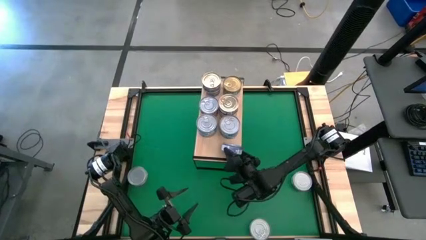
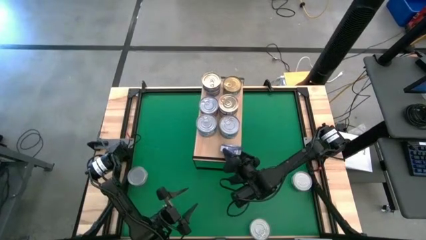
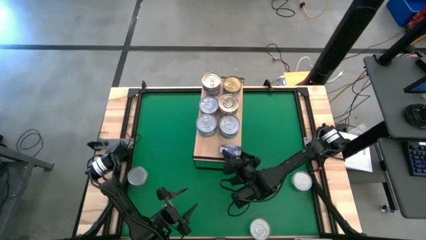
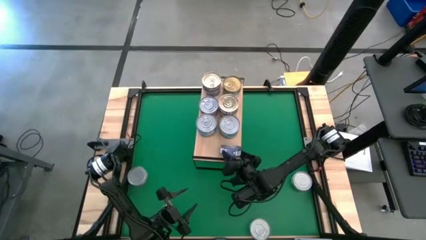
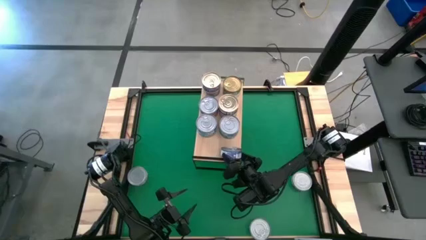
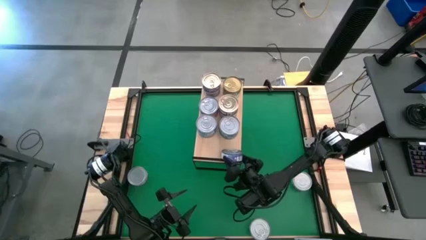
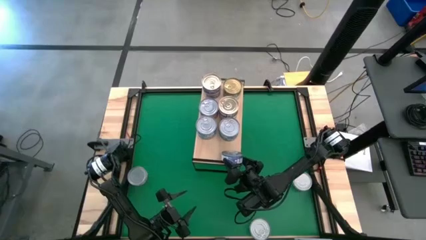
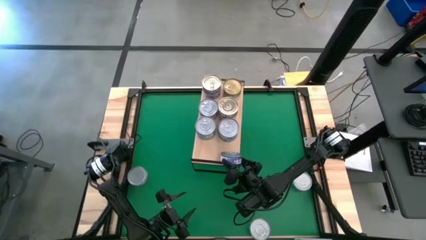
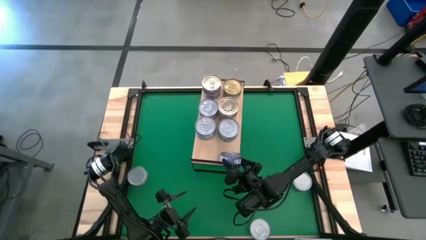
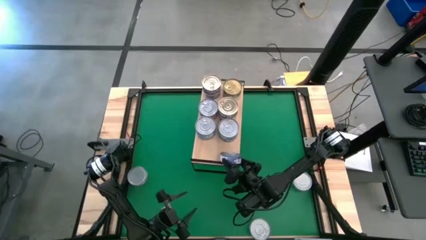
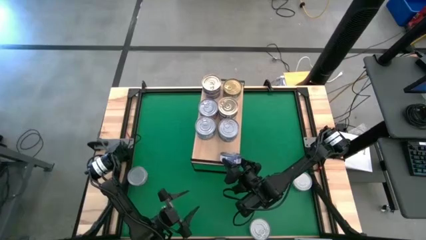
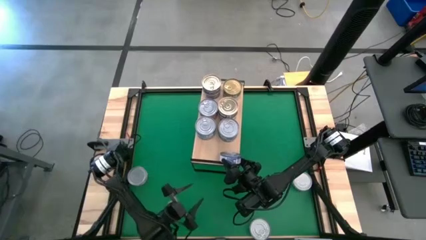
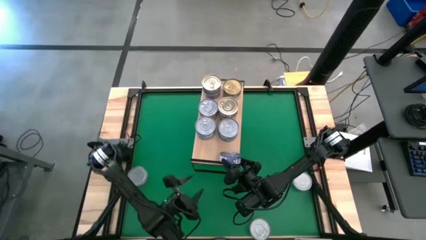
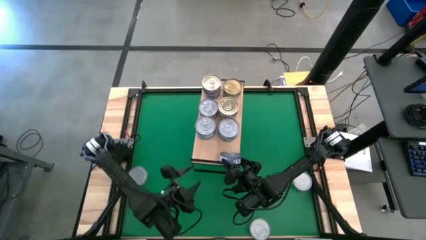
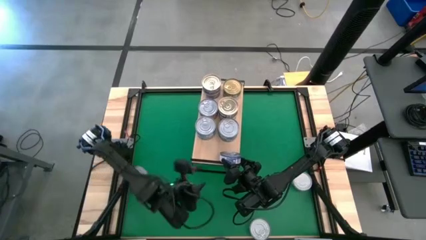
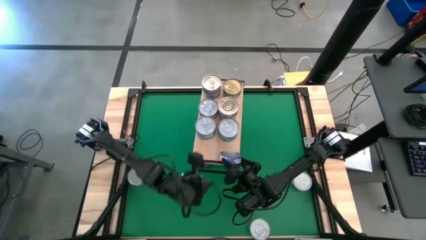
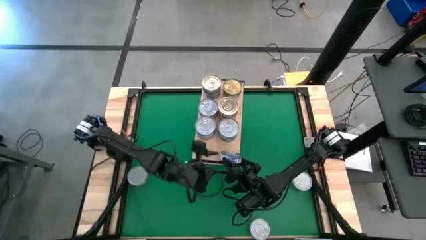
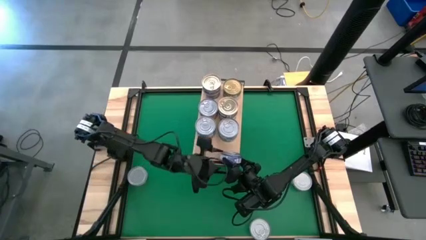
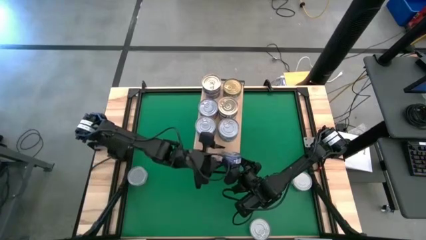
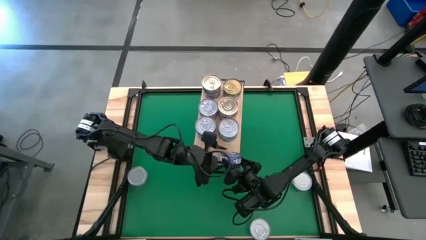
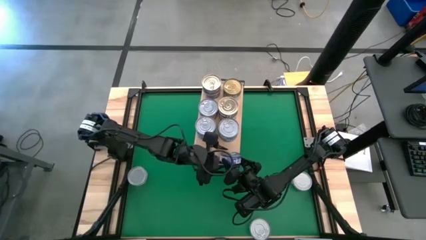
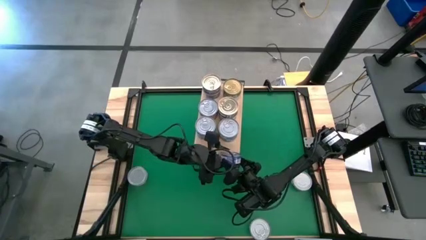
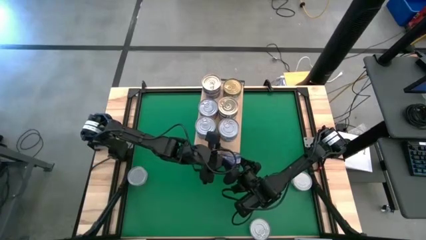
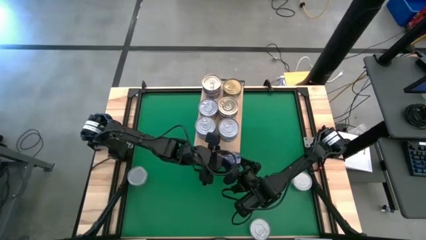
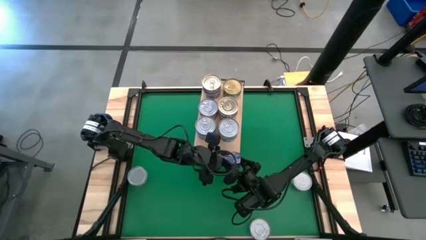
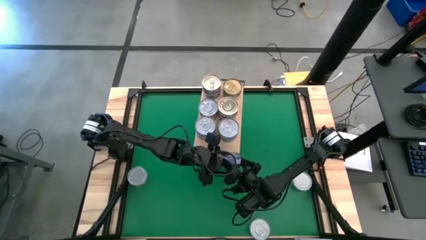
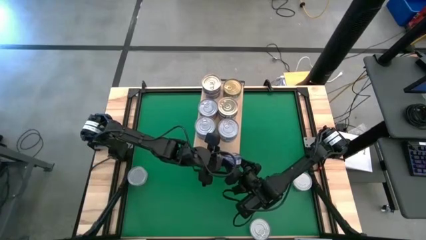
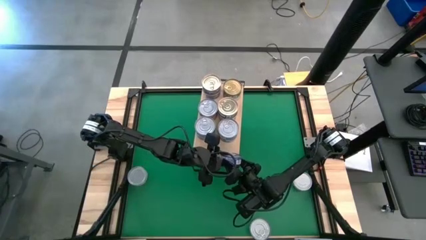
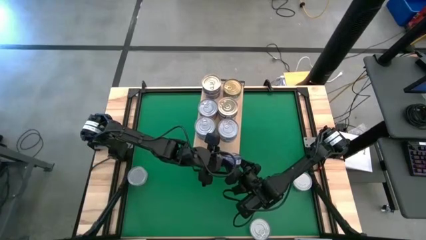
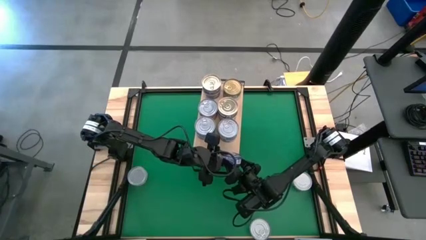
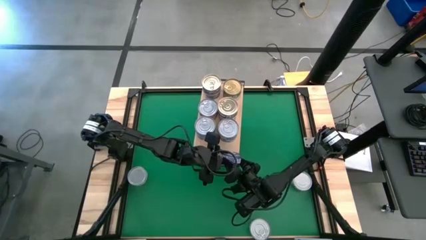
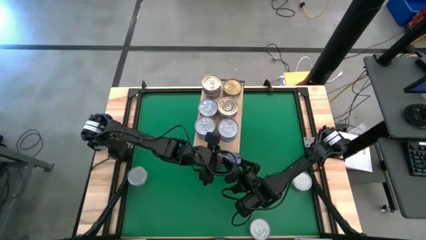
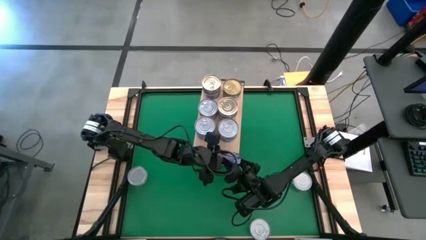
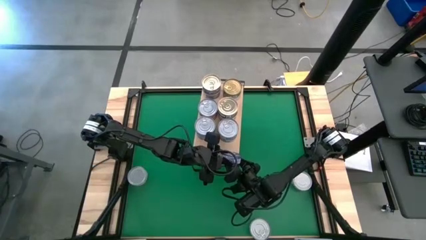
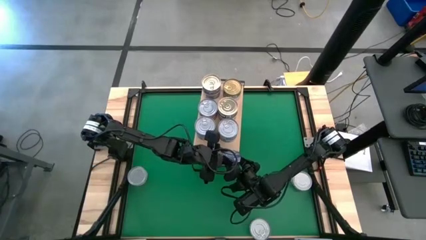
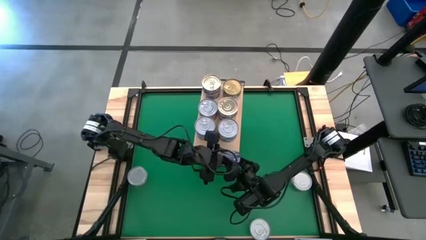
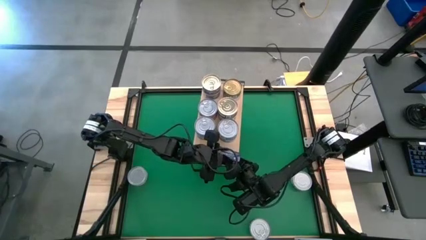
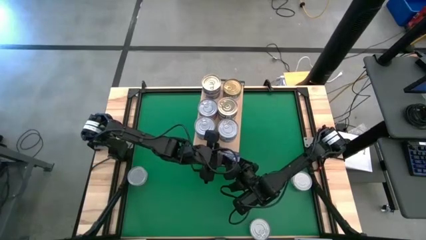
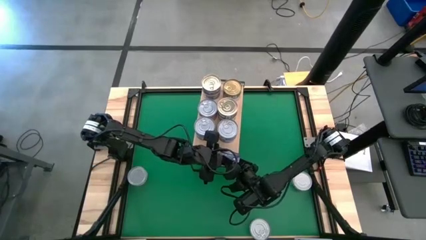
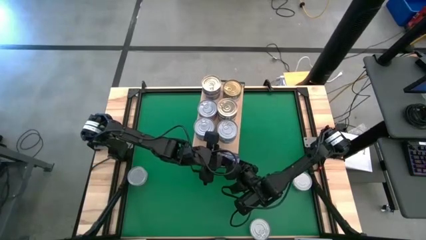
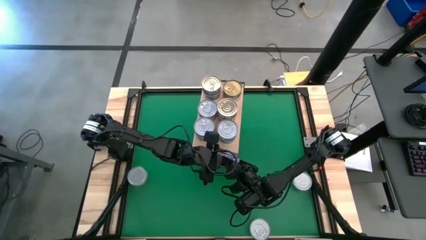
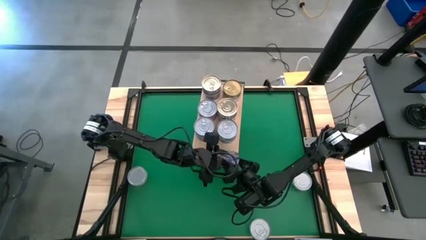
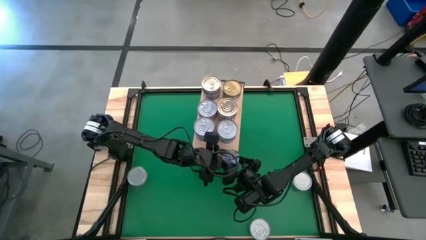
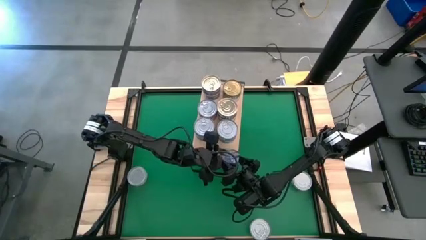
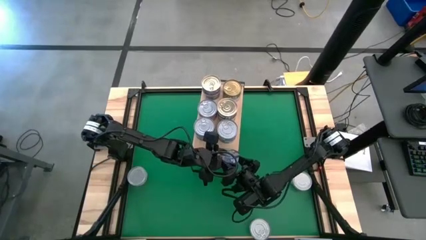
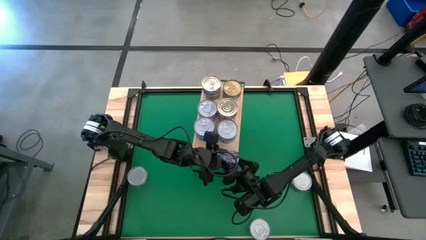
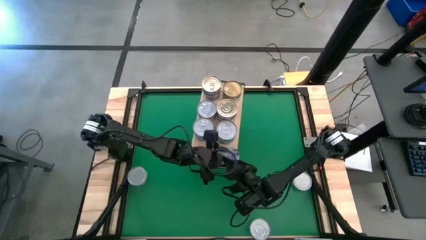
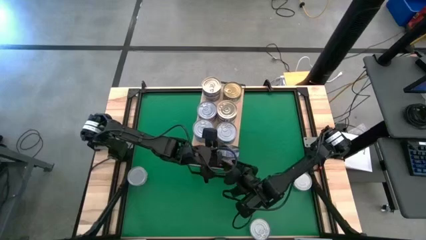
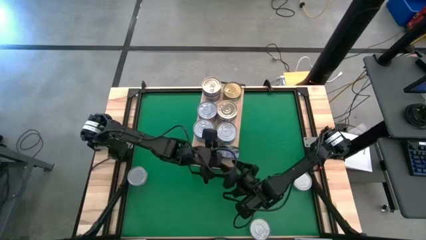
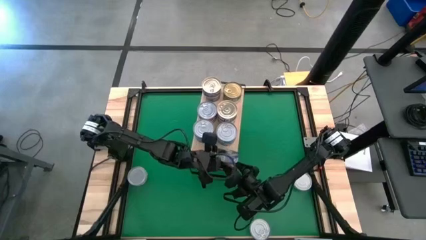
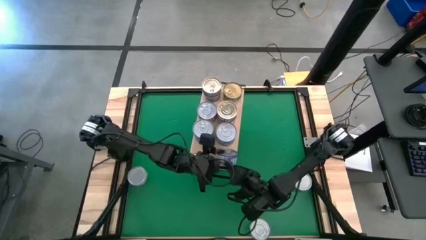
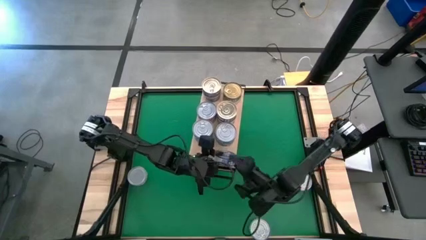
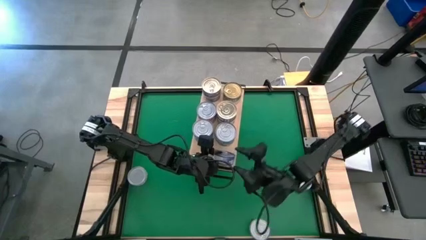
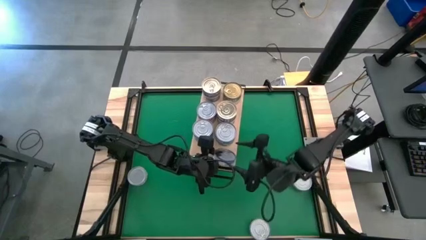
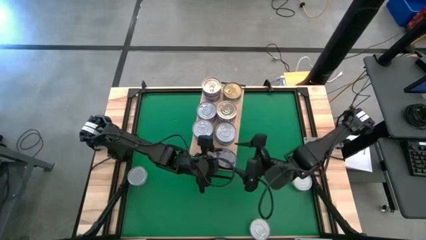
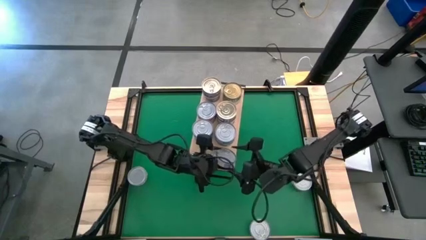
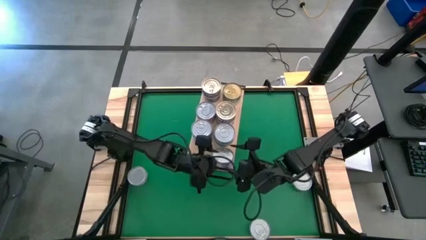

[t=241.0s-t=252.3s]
Task: Stack canned seafood by type on shelf
Put the blue tuna can on the shelf

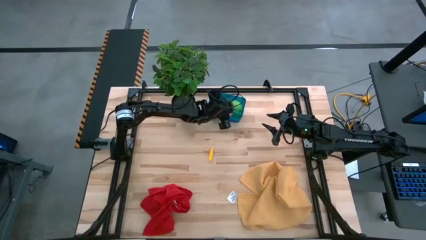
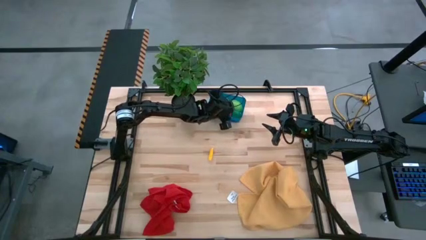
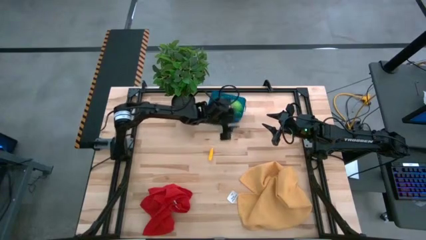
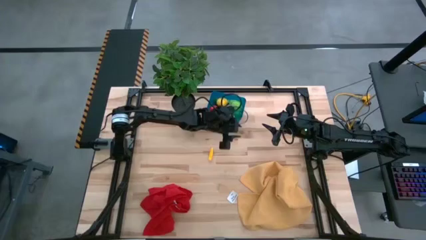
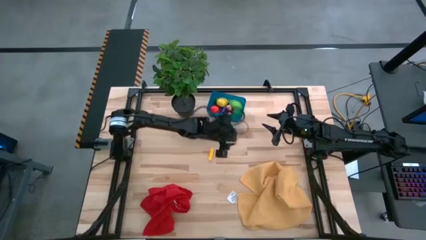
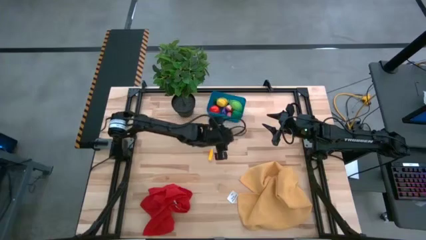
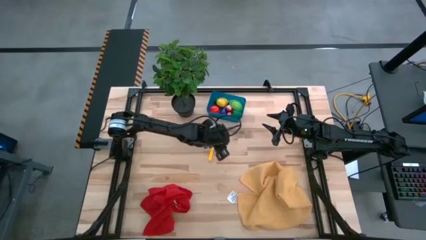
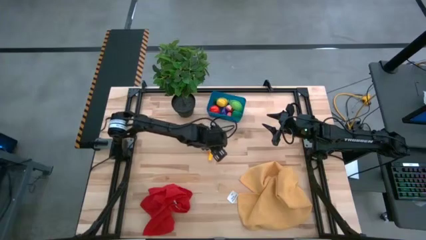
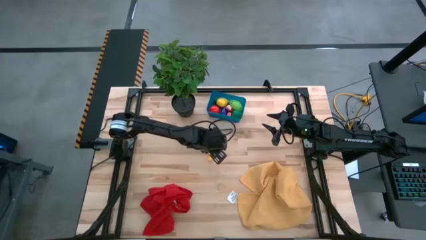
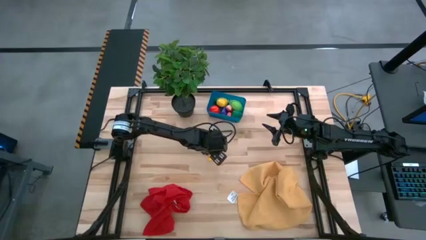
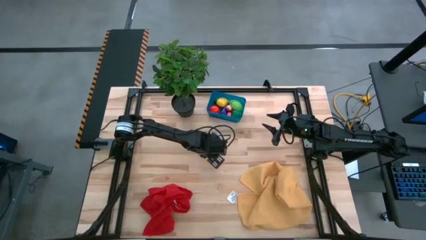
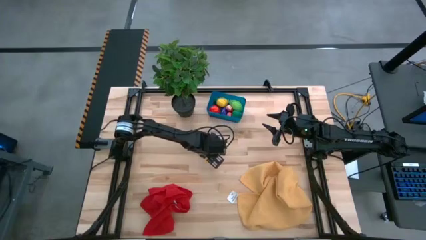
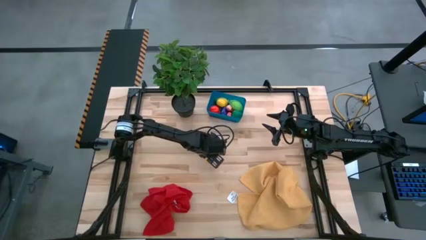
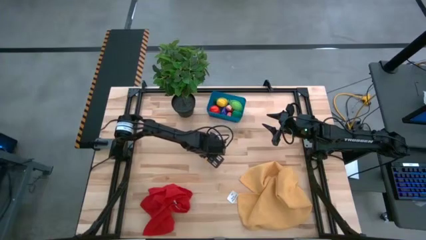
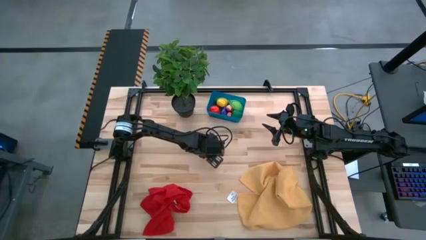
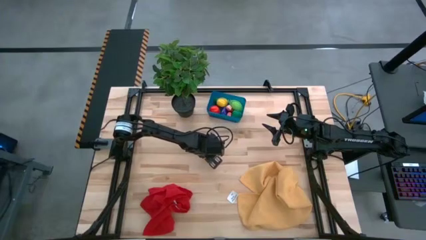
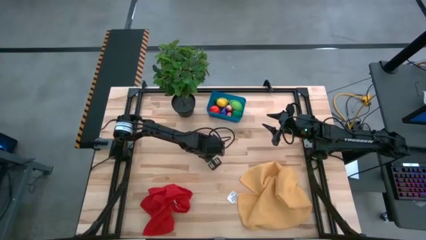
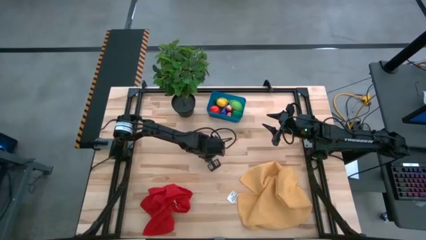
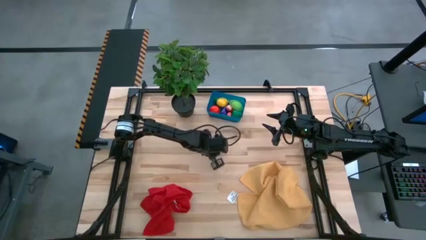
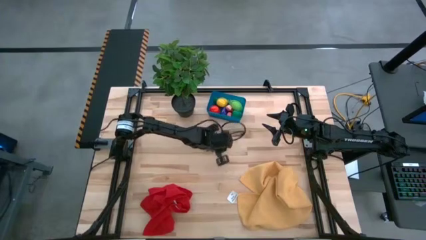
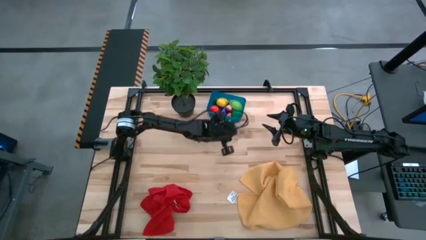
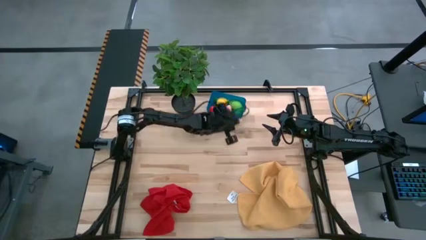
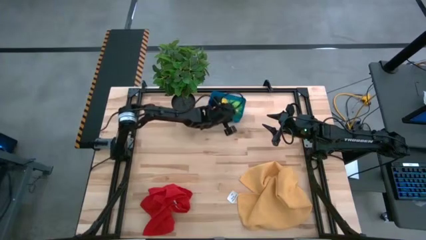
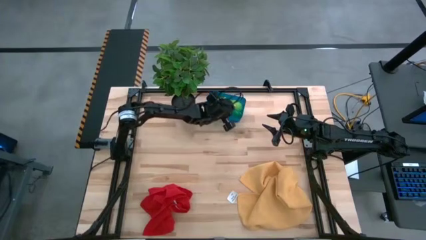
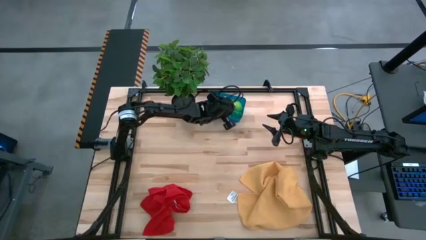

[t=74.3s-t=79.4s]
Task: Pick and placing Produce into tupperware
Put the yellow corn into the blue bin
